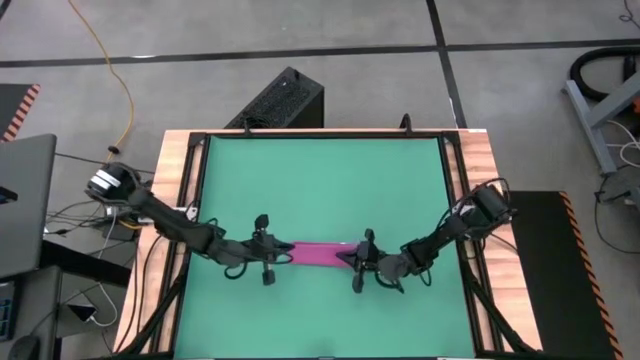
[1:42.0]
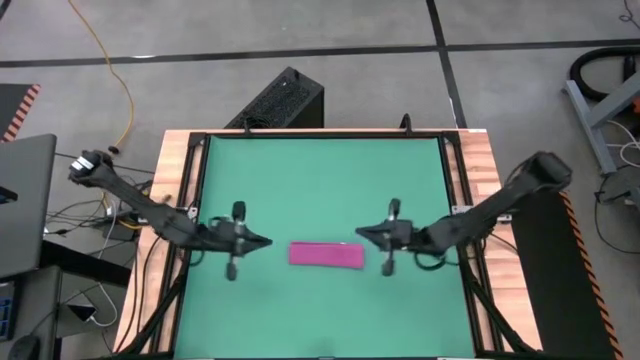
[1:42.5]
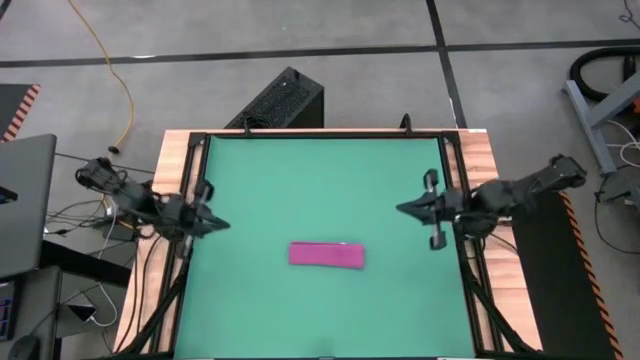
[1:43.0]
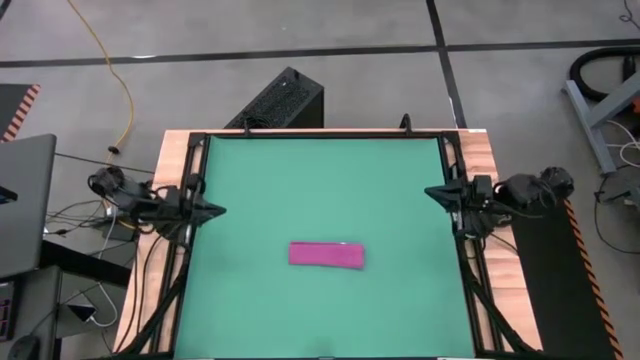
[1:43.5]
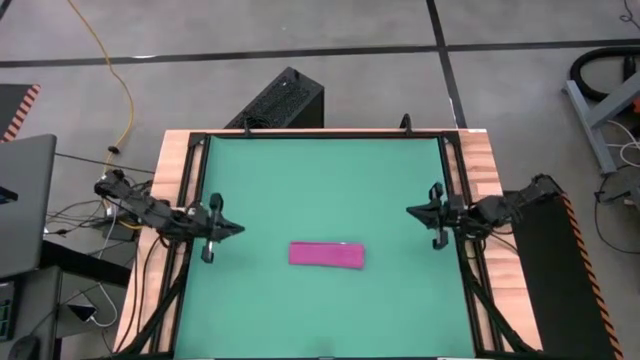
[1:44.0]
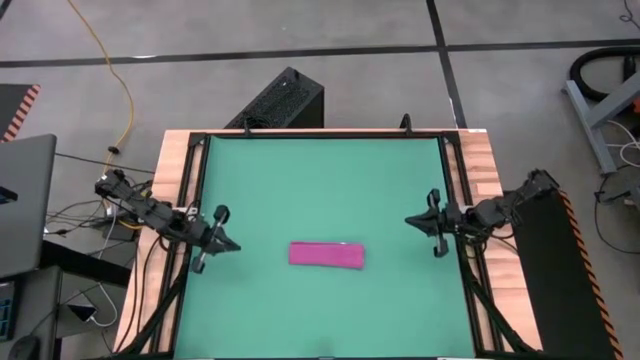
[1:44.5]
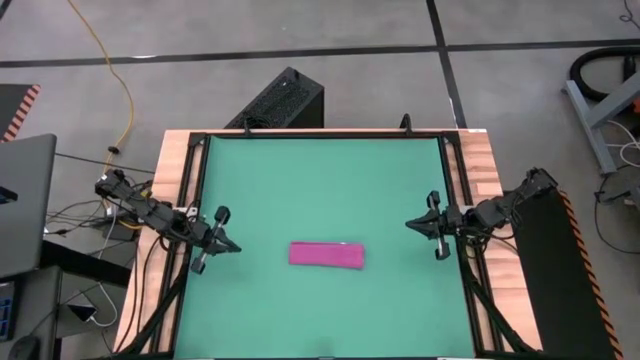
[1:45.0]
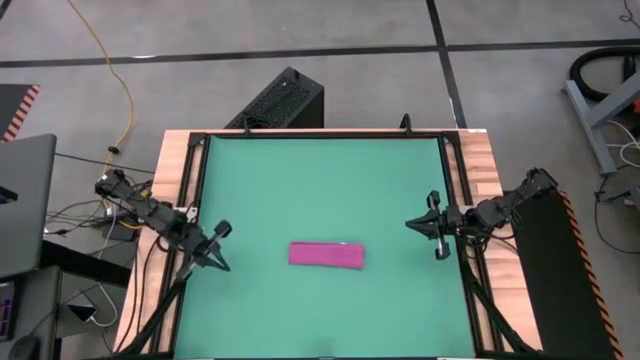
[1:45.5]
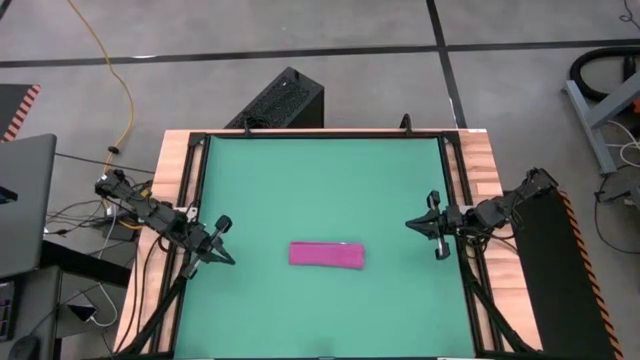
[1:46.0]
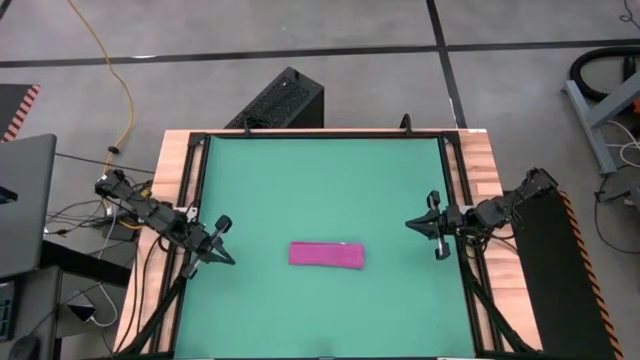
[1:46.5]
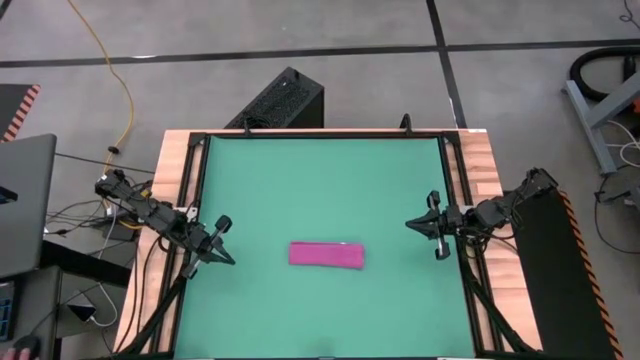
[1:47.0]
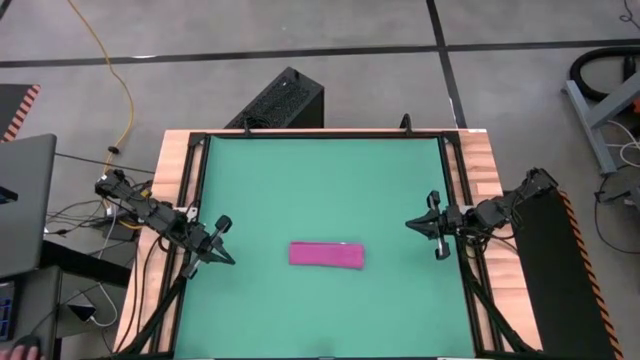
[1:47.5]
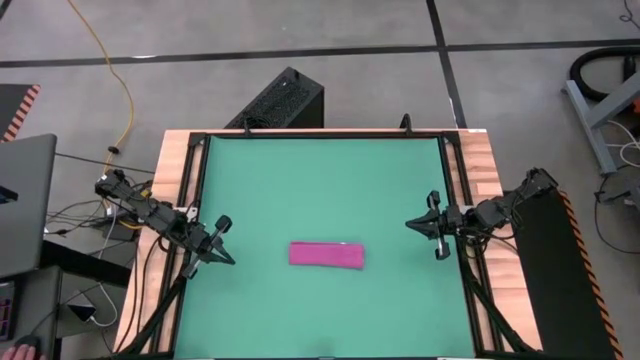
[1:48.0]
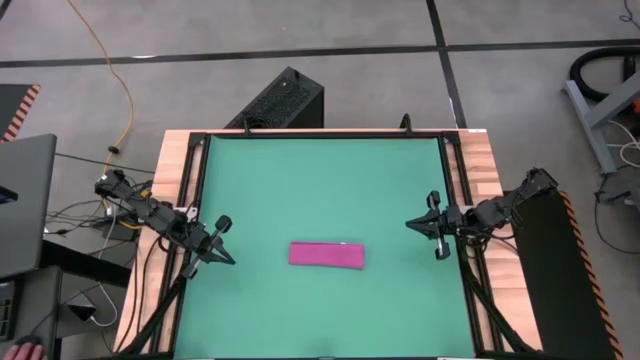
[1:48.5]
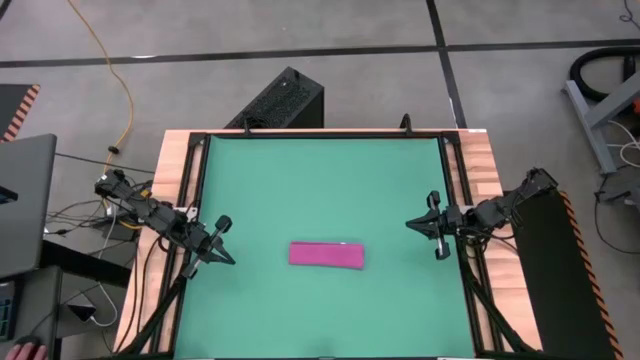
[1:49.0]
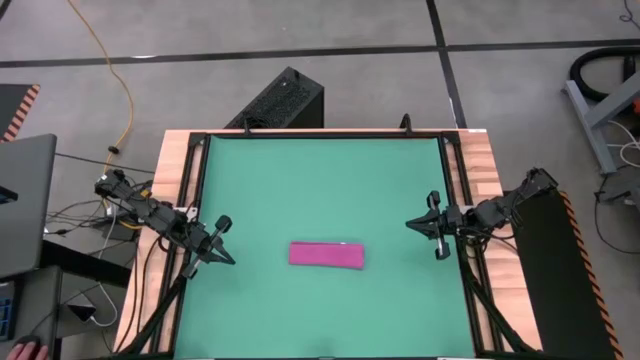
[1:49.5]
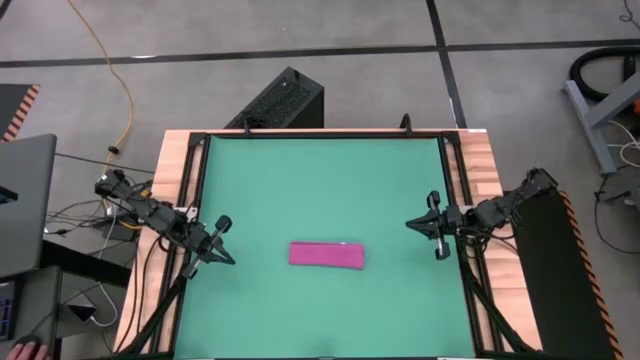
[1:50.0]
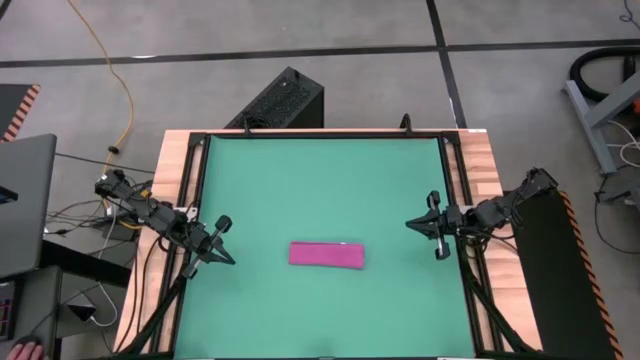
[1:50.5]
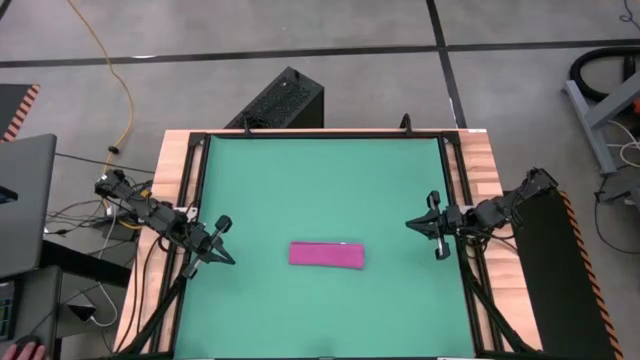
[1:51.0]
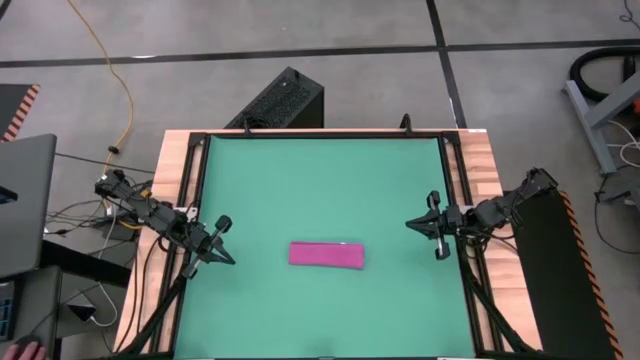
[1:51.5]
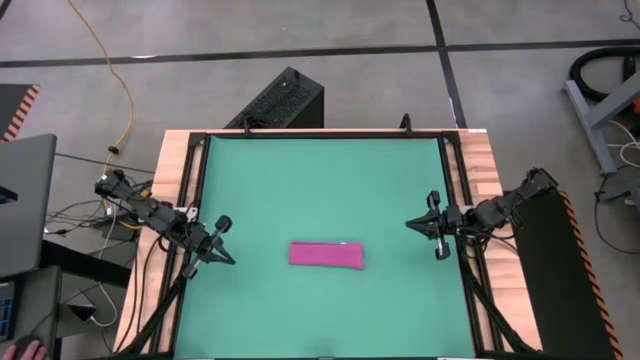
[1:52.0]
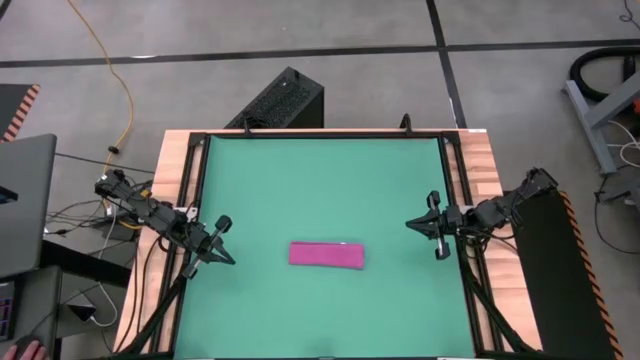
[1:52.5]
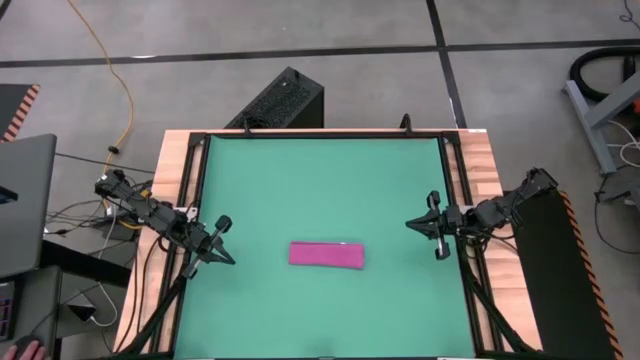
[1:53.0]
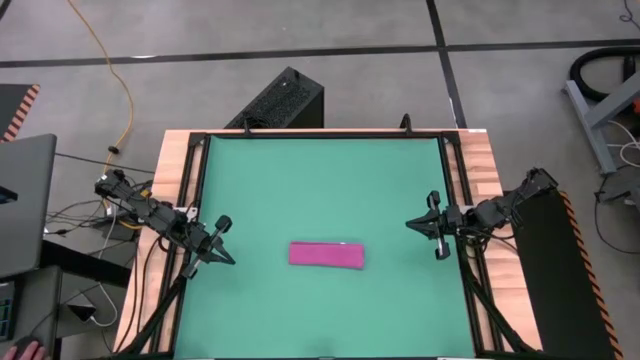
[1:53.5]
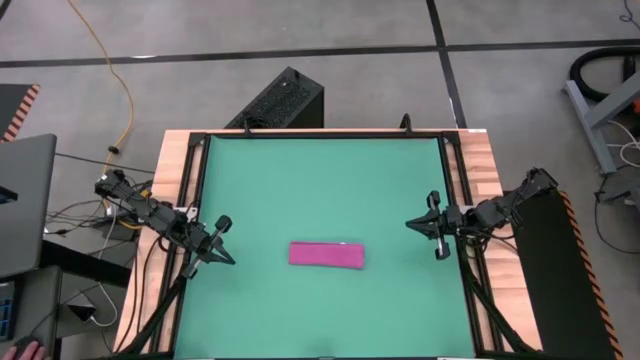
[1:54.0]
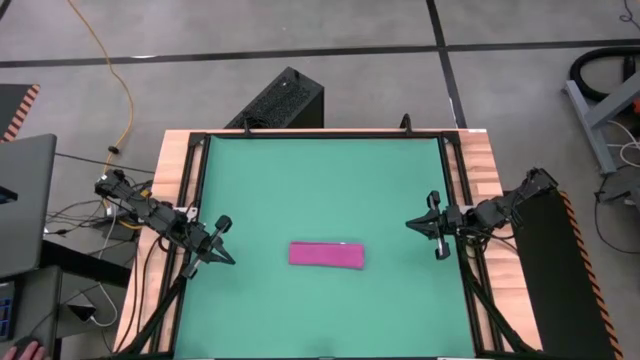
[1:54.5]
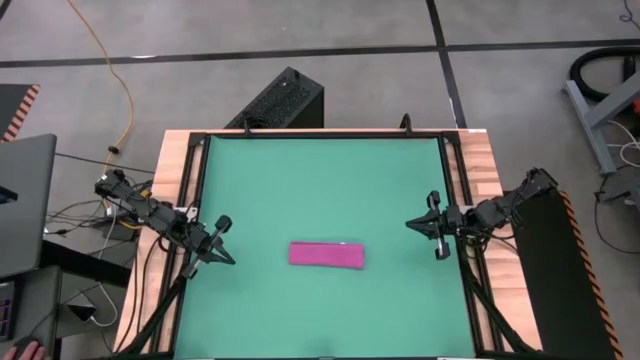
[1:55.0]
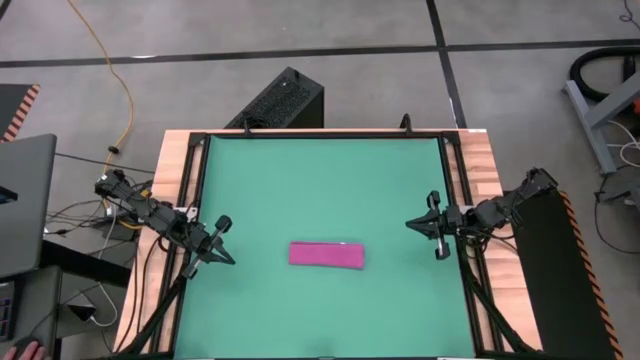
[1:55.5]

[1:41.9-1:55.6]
Task: Roll towel into tight, uniform cylinder
Return to Home Position

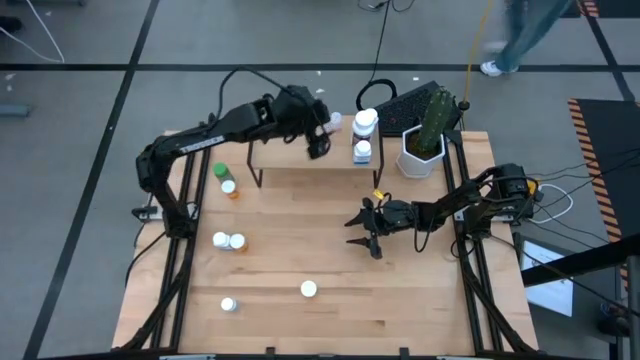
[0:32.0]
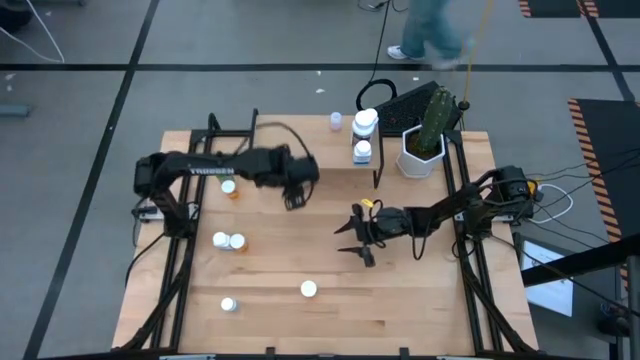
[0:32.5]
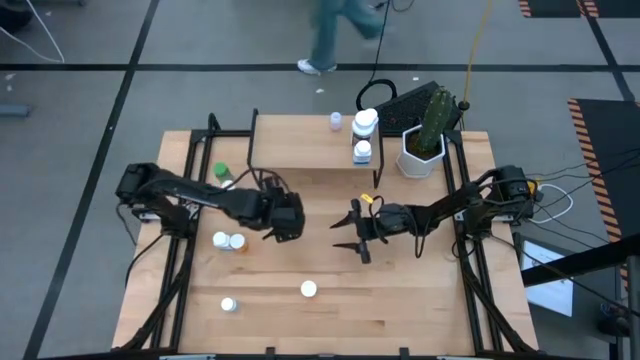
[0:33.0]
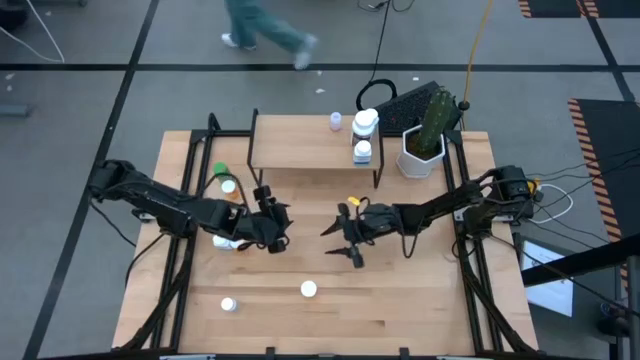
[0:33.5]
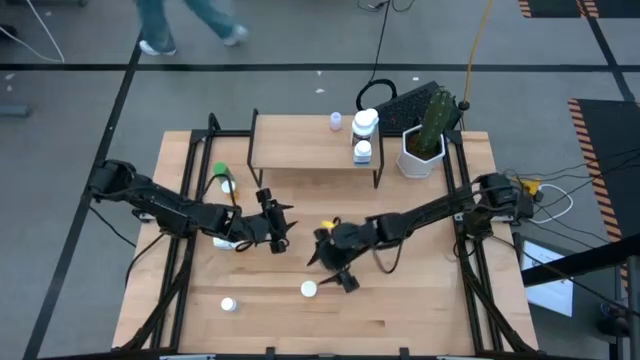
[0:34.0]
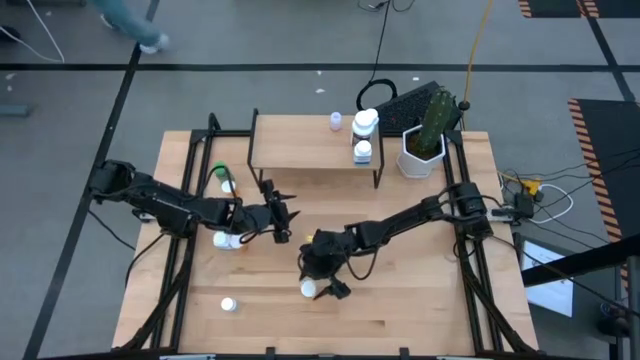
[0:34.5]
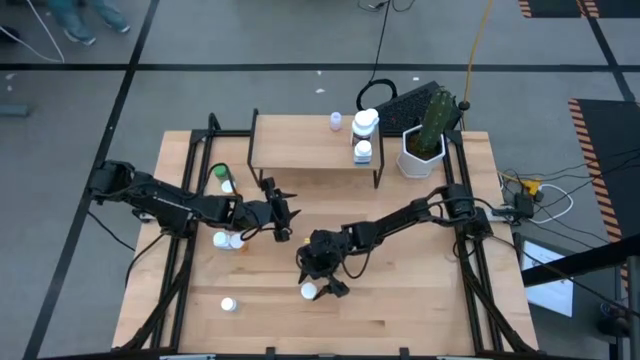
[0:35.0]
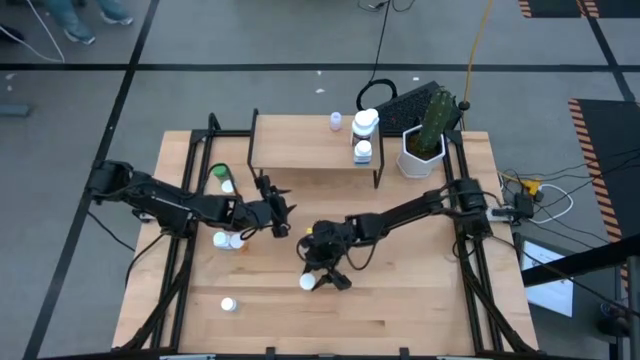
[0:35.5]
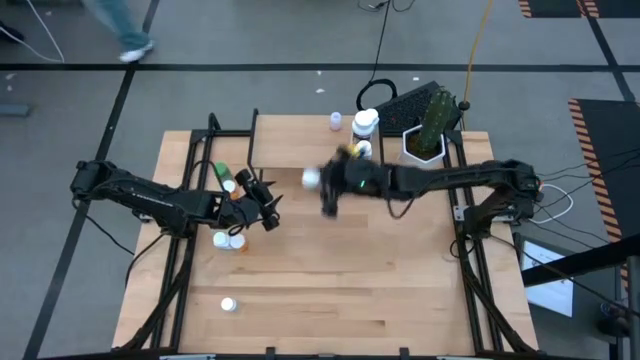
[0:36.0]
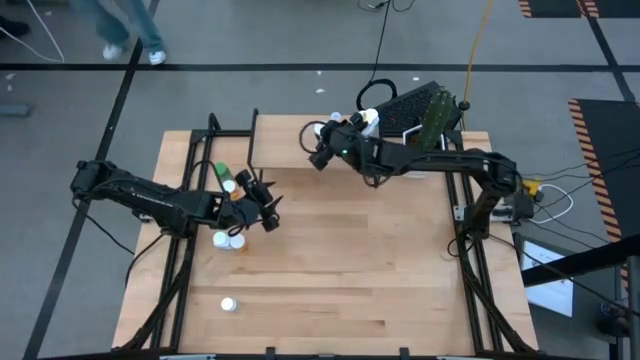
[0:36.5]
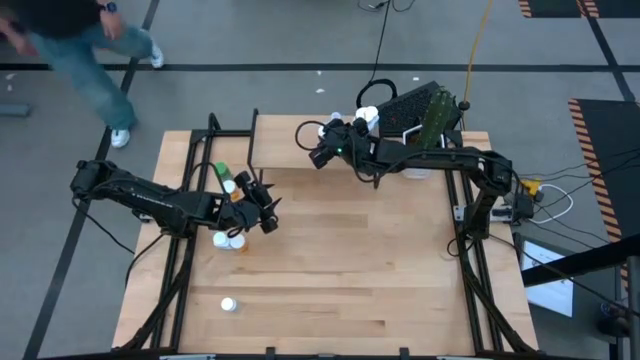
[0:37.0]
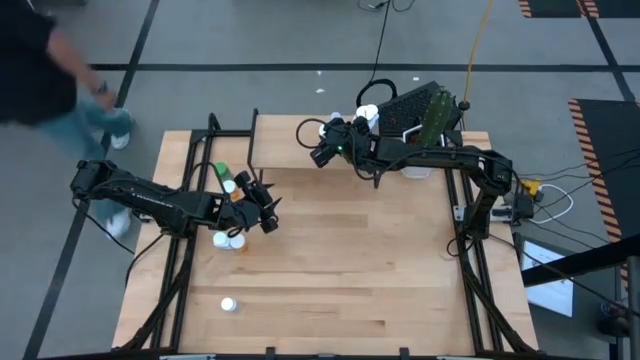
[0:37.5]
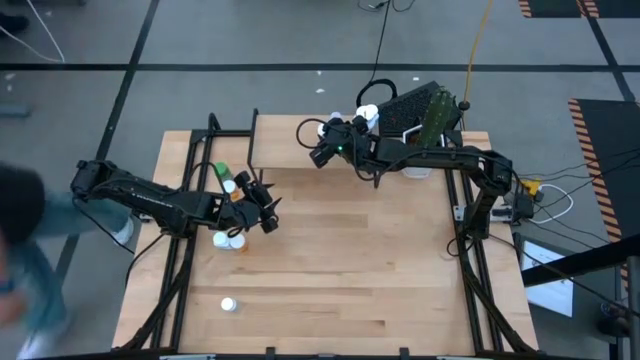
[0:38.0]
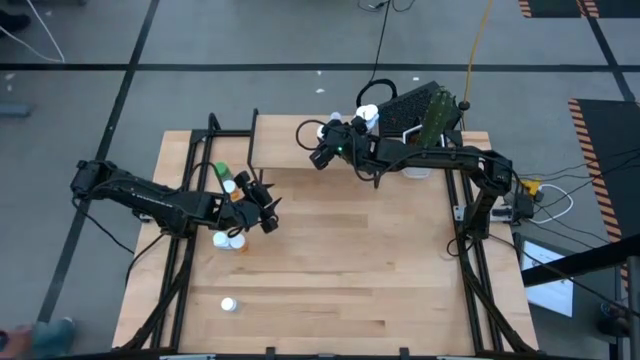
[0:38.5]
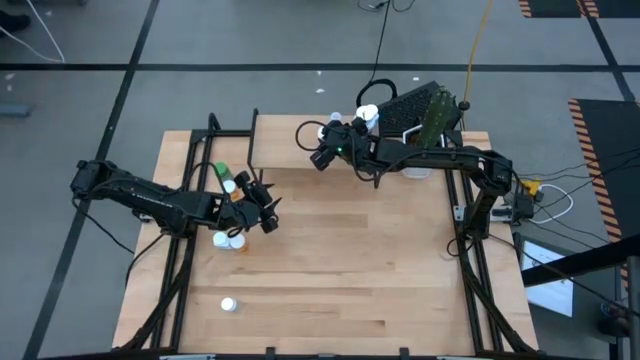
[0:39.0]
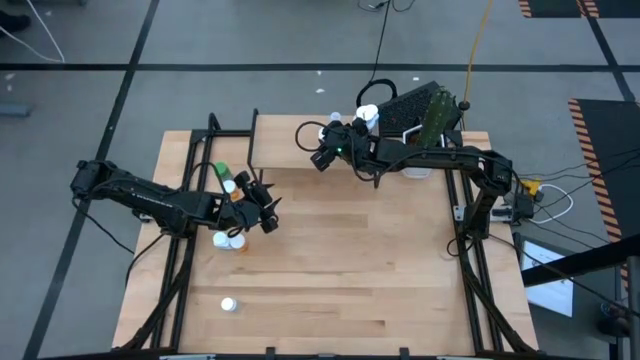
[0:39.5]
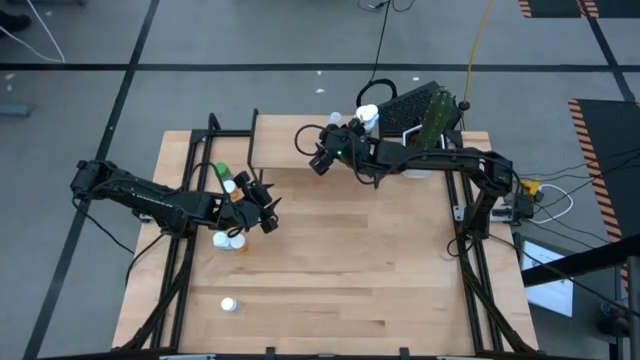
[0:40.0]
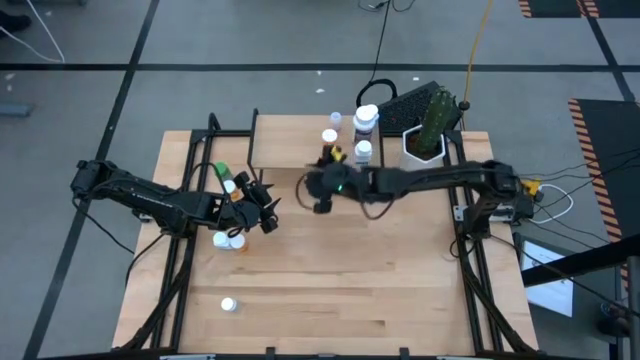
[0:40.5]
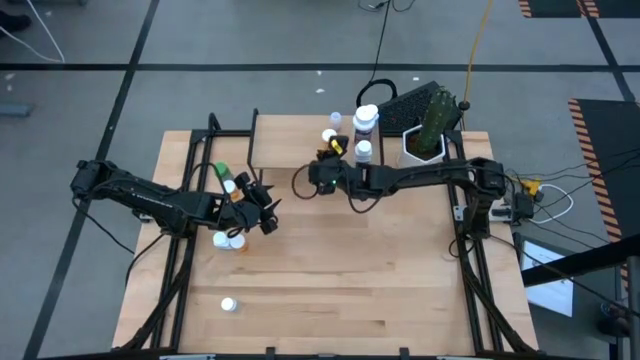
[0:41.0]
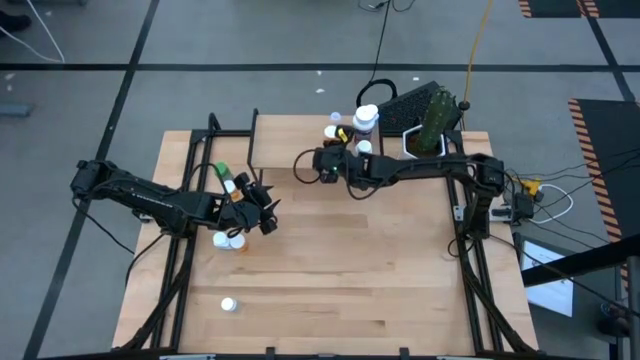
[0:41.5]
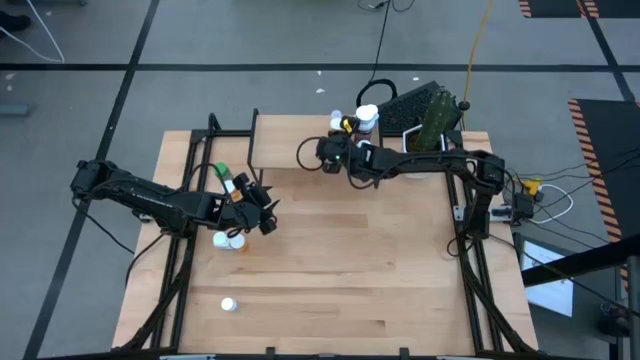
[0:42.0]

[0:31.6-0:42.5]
Task: Pick and place medicine bottles onto shelf by color
Put the bottom orange medicine bottle on the shelf
